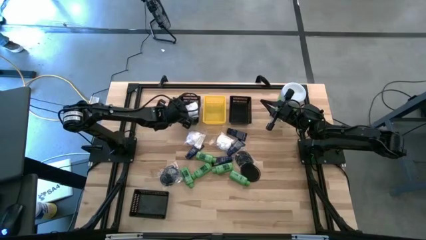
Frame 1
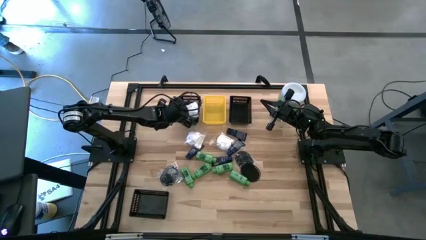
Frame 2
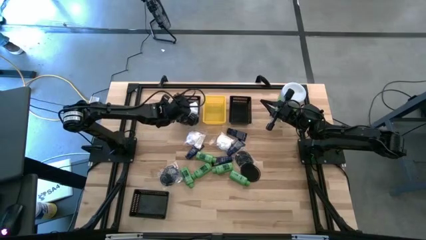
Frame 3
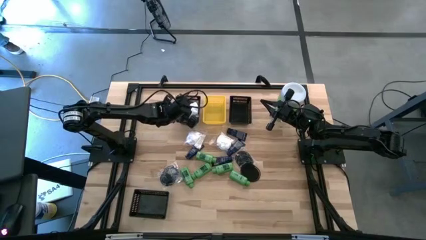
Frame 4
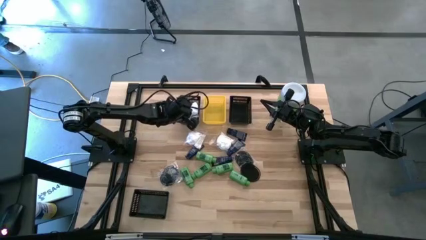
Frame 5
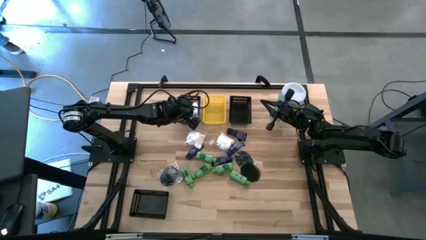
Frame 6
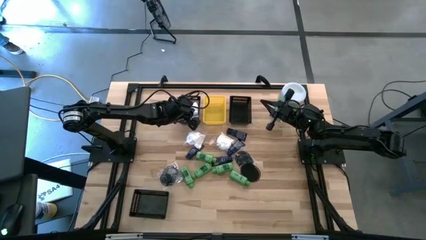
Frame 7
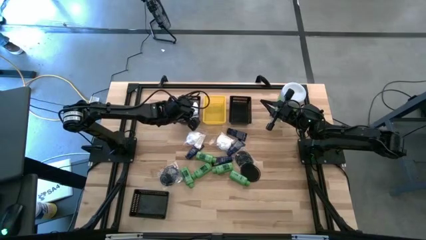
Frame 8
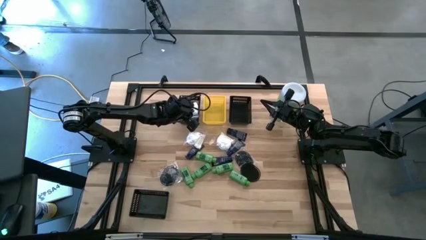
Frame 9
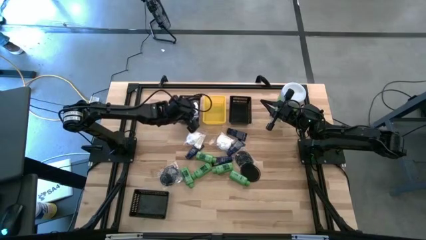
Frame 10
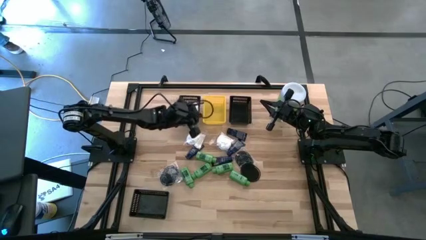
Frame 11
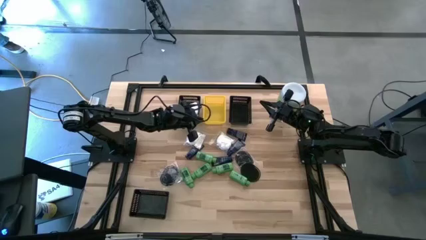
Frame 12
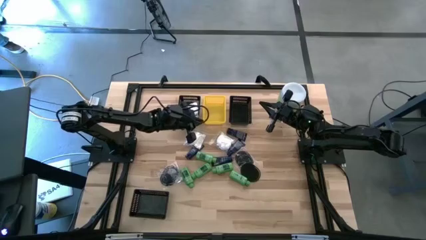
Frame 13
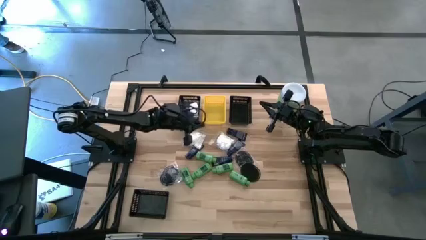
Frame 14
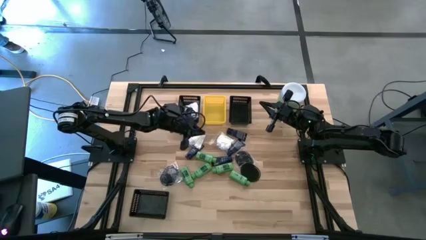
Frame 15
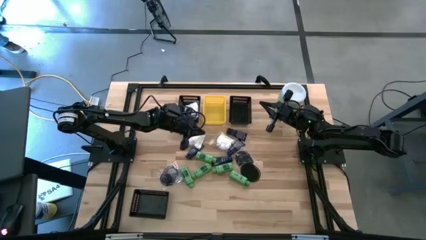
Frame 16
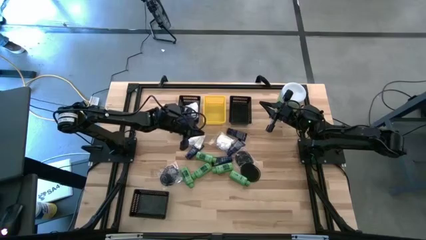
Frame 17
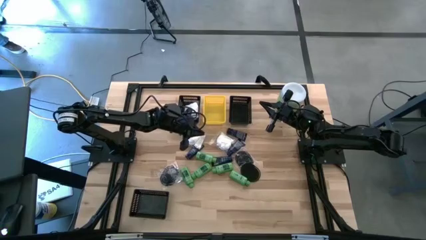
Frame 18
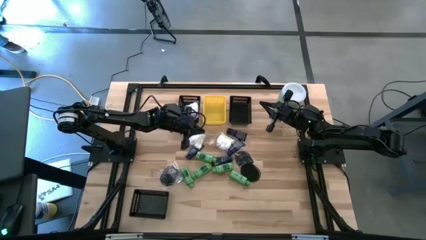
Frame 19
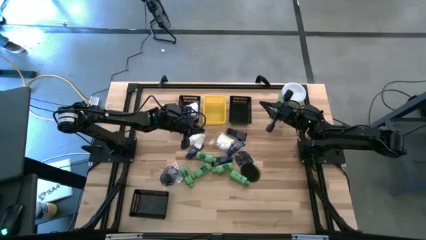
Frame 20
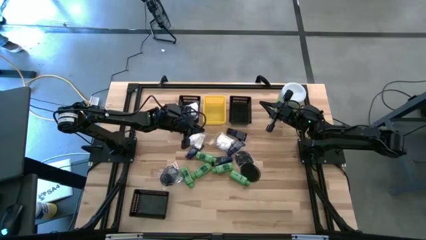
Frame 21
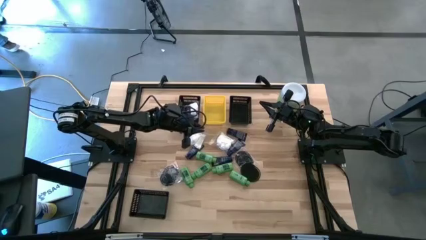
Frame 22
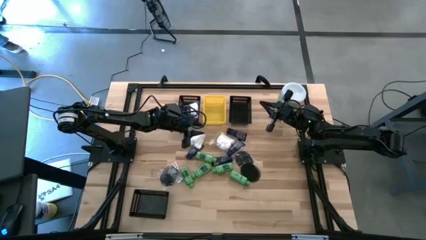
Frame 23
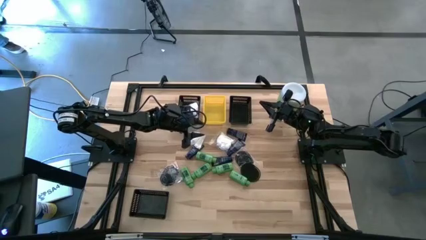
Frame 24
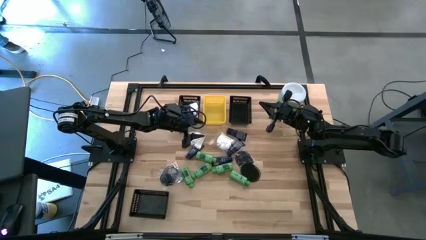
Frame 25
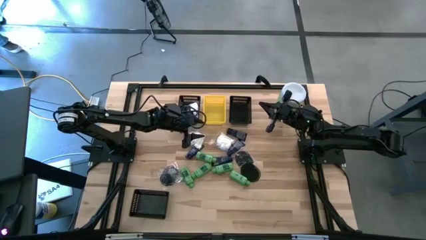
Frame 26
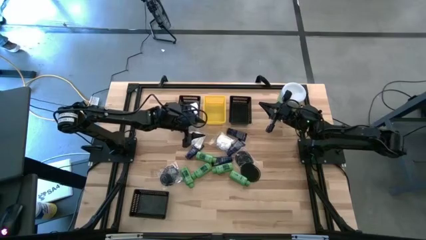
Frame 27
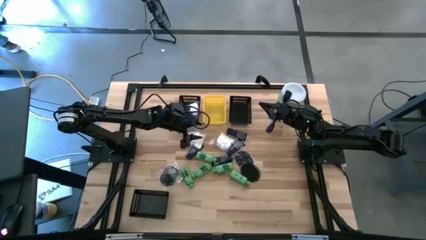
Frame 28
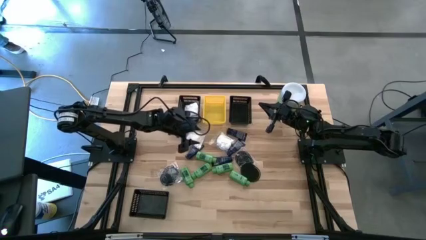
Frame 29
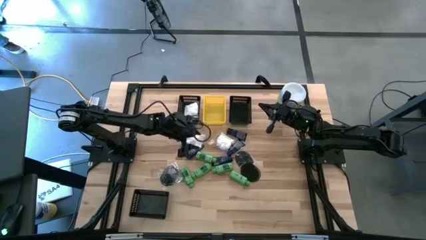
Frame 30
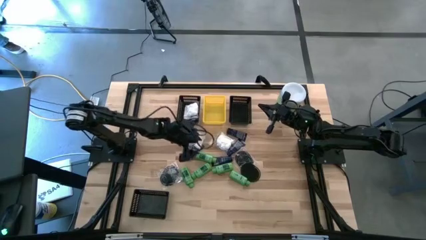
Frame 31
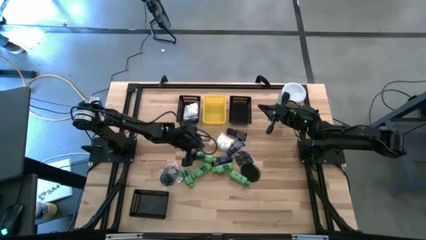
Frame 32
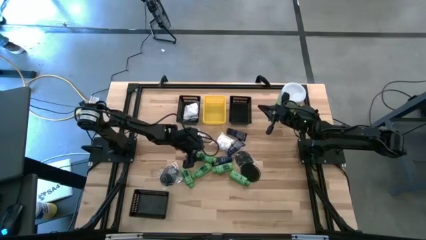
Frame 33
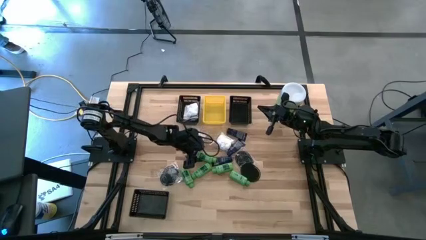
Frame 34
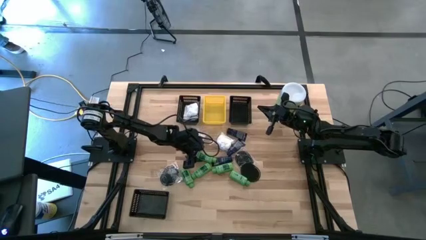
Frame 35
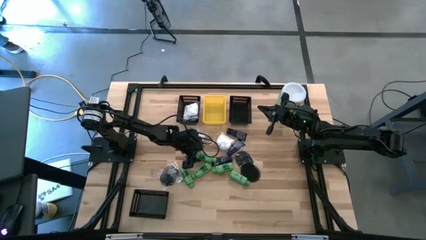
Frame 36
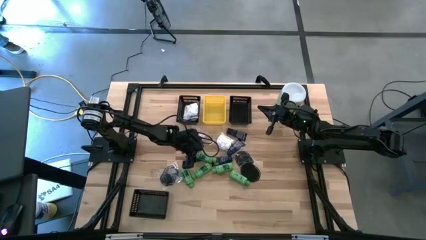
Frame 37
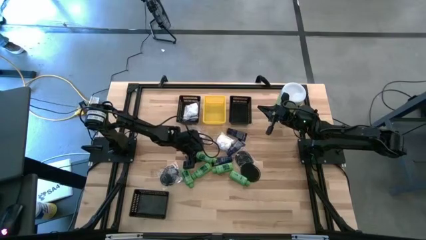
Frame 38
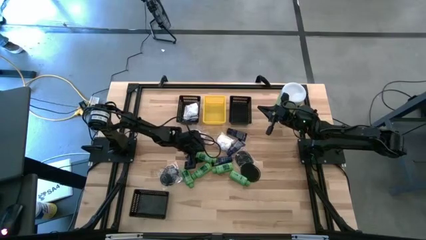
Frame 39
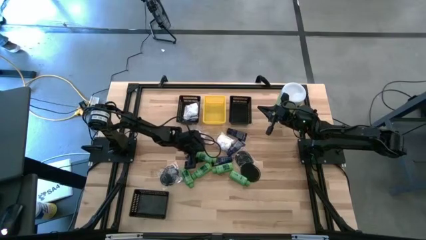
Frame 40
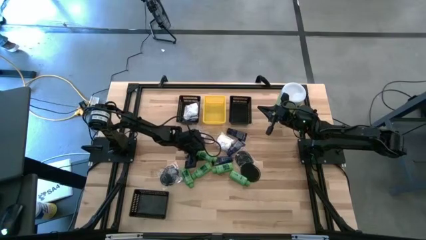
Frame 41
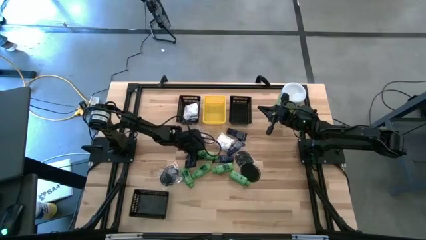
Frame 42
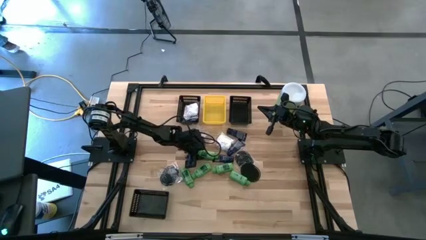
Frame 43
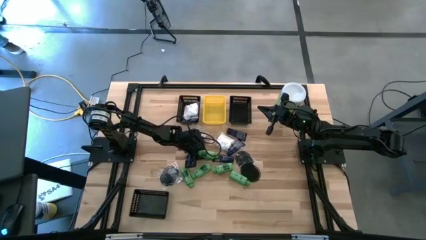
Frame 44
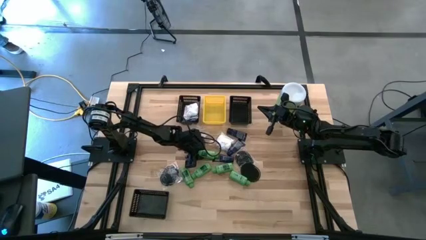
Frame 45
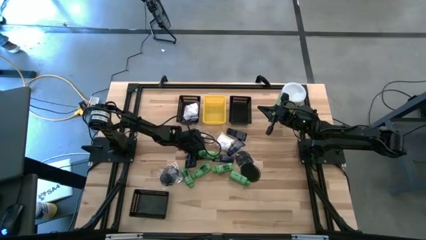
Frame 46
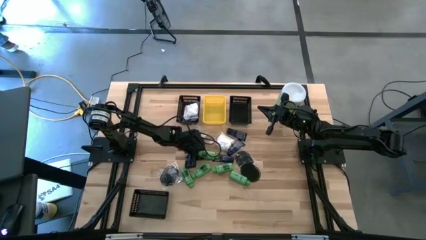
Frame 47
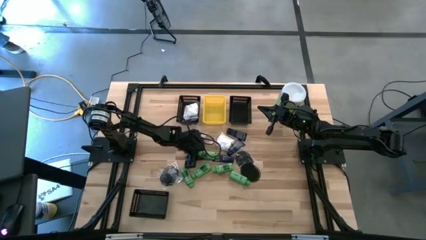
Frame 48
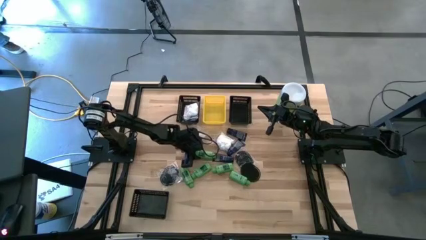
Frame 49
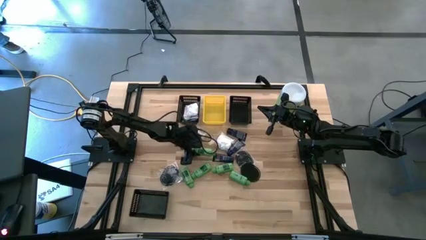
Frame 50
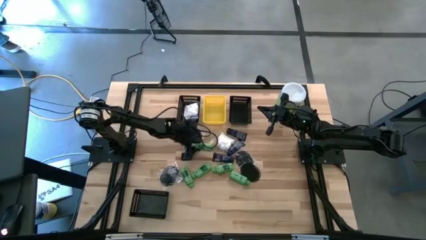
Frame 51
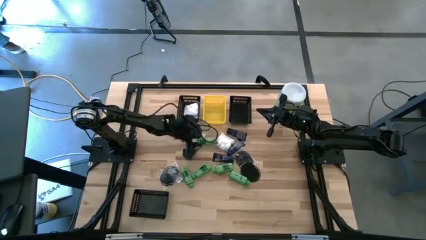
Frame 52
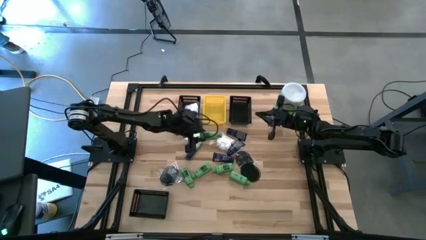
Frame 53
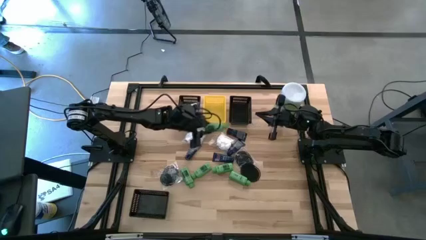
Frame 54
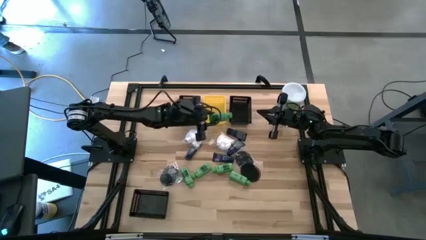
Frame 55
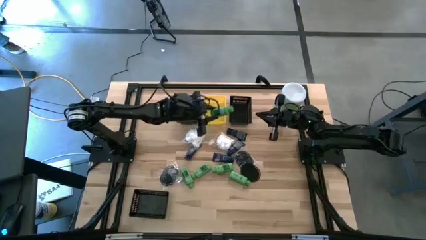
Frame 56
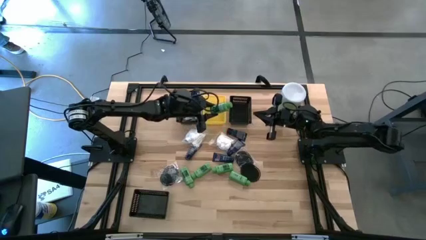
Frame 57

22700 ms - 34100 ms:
Task: Pick & Place Travel size toiletries
Put the green shampoo bottle into the top right black bin
